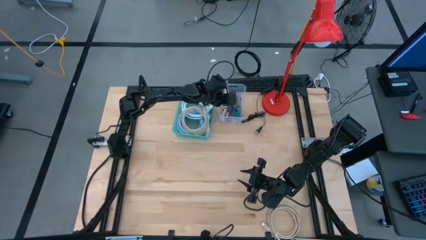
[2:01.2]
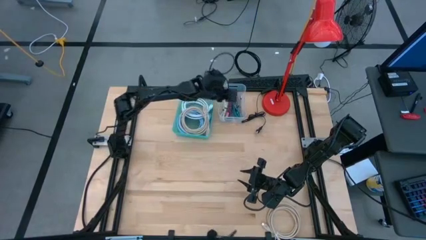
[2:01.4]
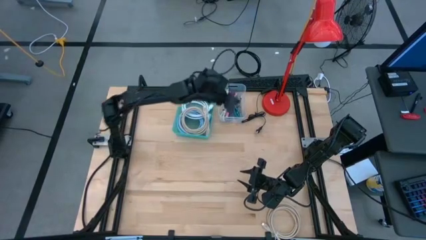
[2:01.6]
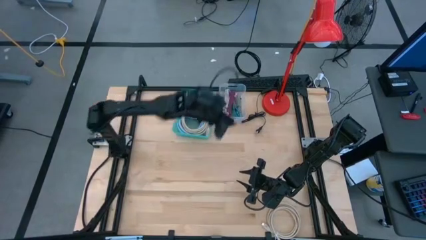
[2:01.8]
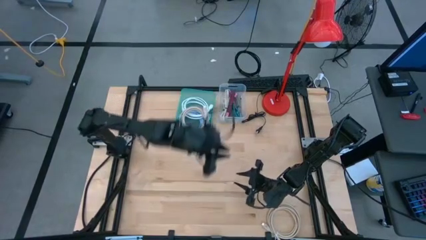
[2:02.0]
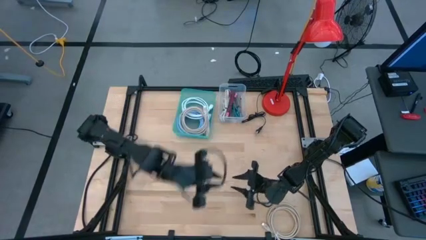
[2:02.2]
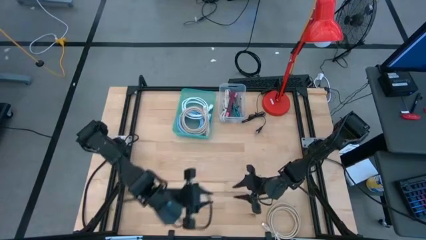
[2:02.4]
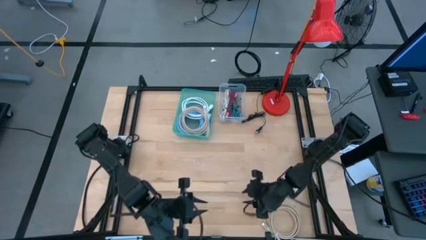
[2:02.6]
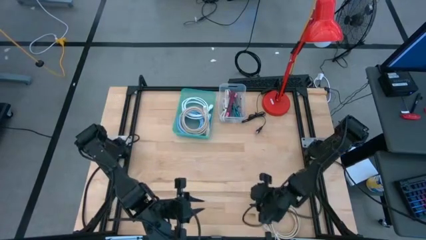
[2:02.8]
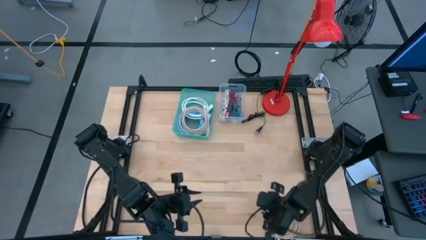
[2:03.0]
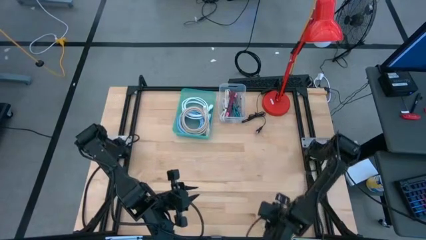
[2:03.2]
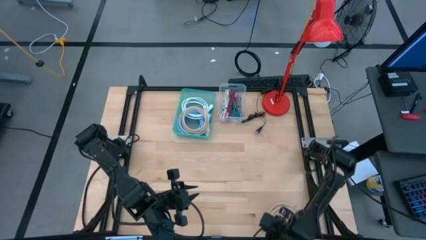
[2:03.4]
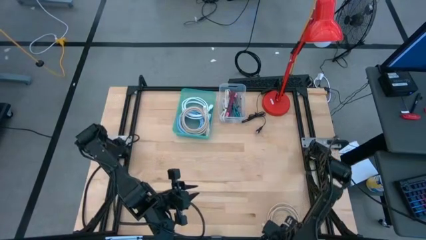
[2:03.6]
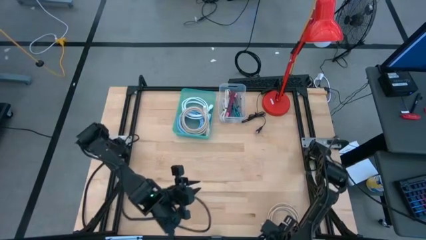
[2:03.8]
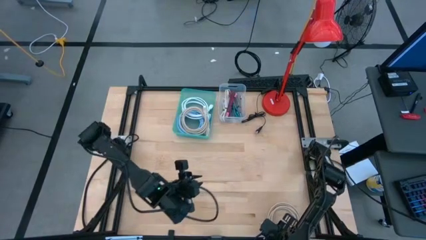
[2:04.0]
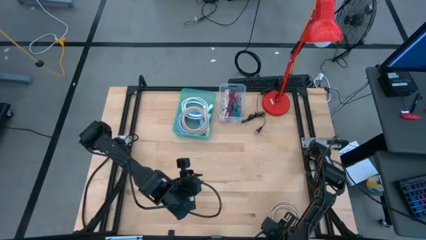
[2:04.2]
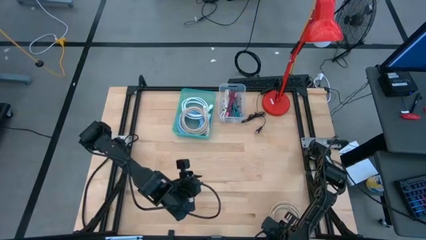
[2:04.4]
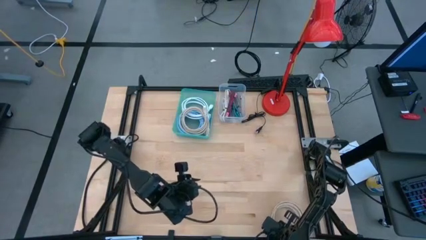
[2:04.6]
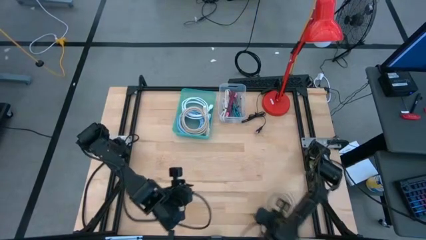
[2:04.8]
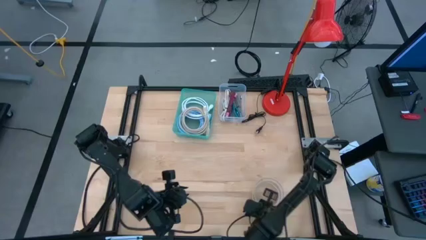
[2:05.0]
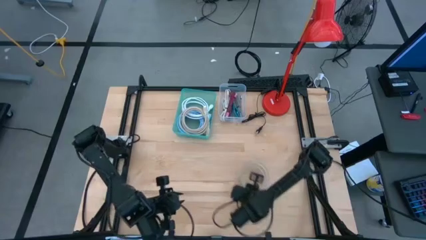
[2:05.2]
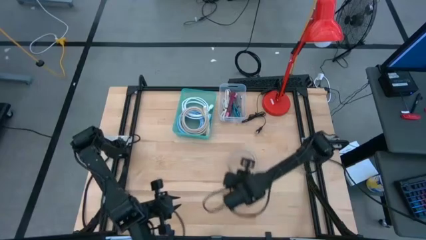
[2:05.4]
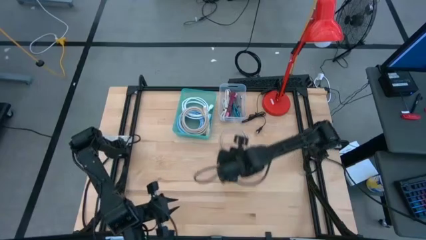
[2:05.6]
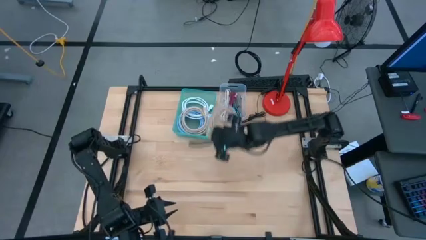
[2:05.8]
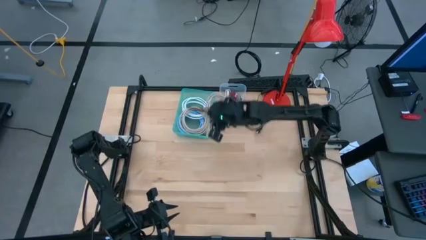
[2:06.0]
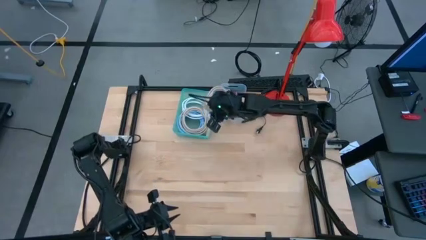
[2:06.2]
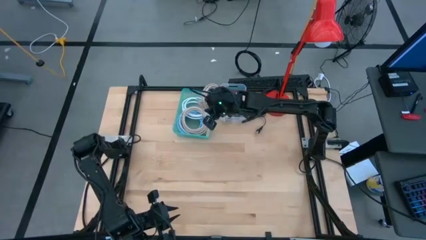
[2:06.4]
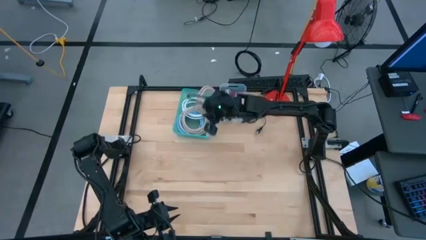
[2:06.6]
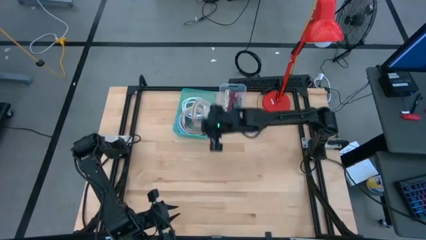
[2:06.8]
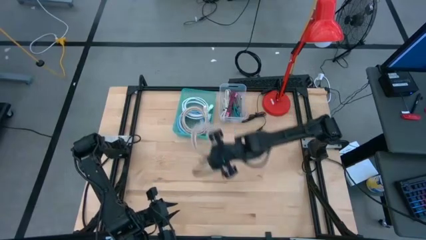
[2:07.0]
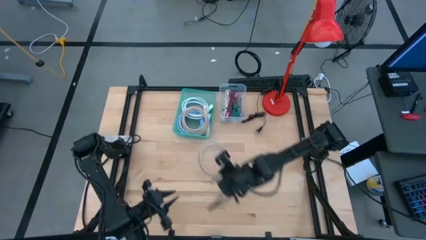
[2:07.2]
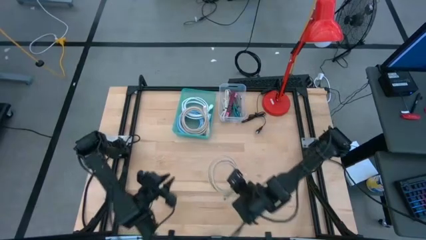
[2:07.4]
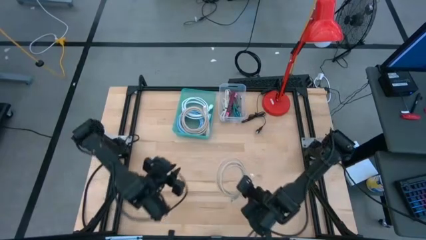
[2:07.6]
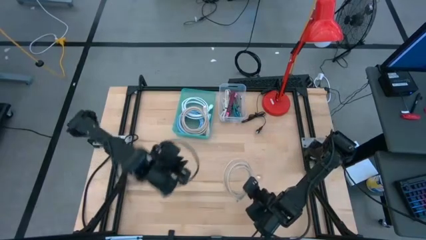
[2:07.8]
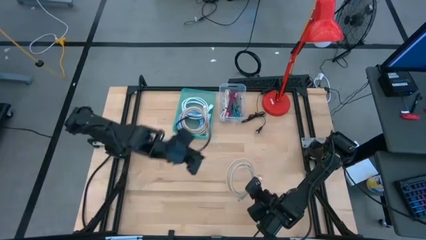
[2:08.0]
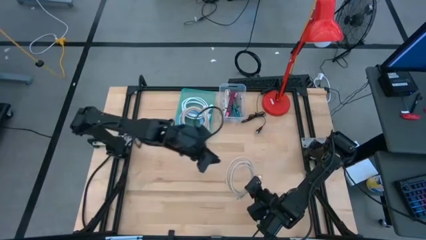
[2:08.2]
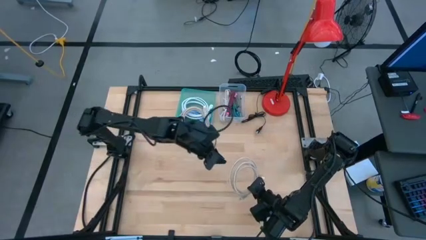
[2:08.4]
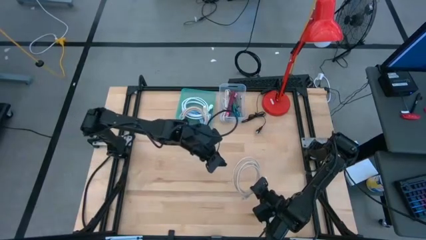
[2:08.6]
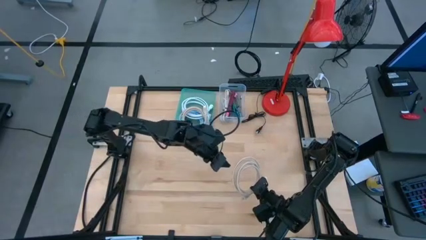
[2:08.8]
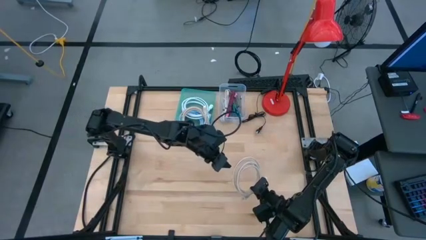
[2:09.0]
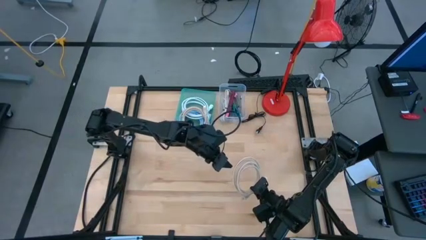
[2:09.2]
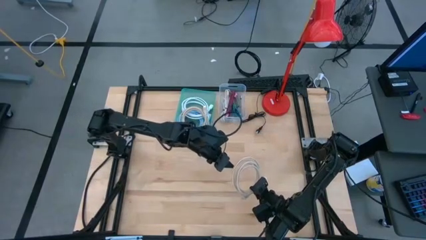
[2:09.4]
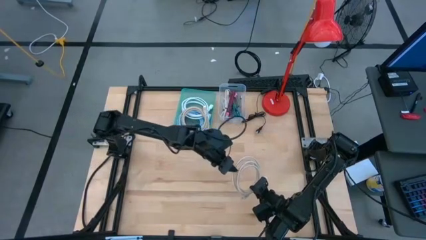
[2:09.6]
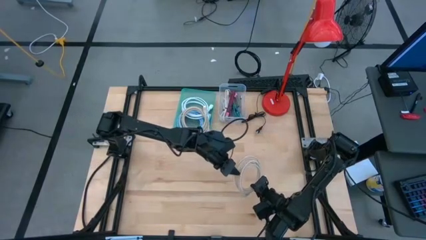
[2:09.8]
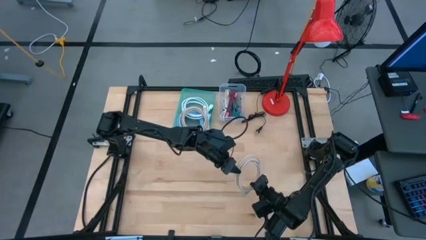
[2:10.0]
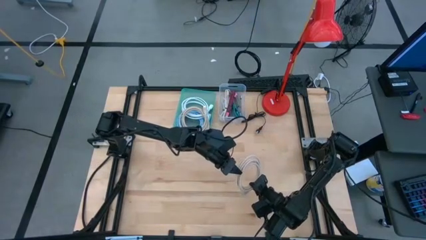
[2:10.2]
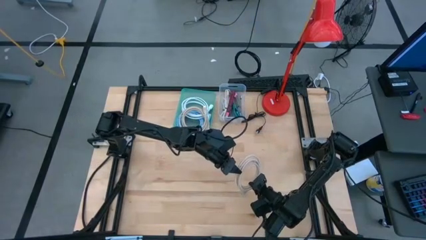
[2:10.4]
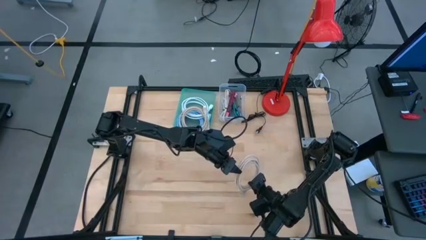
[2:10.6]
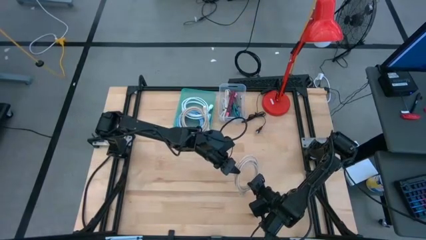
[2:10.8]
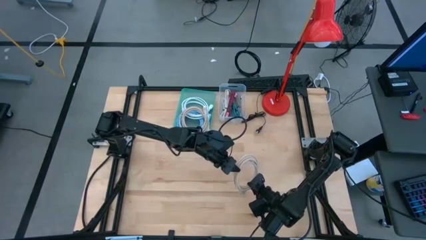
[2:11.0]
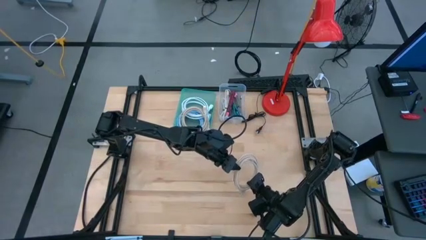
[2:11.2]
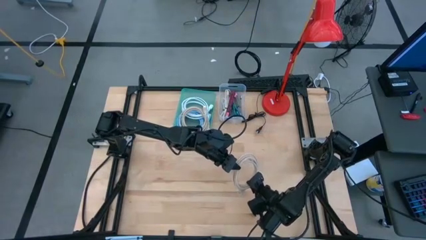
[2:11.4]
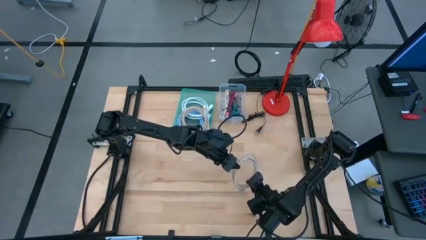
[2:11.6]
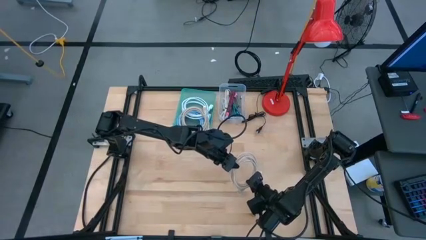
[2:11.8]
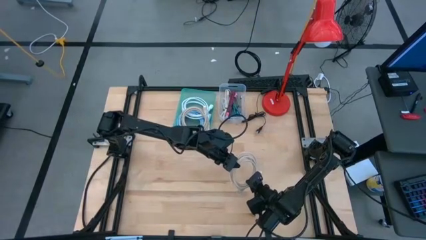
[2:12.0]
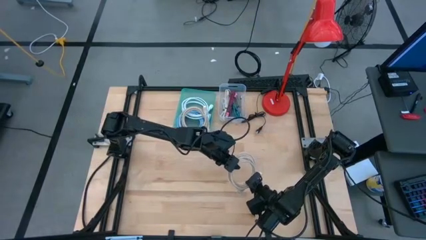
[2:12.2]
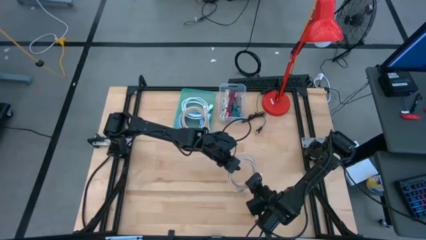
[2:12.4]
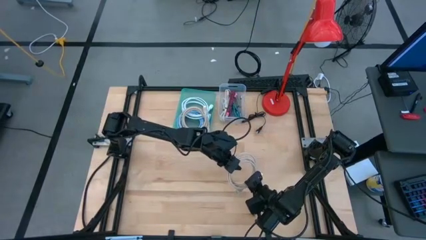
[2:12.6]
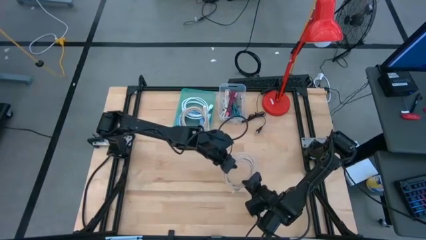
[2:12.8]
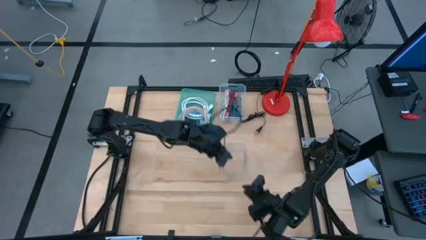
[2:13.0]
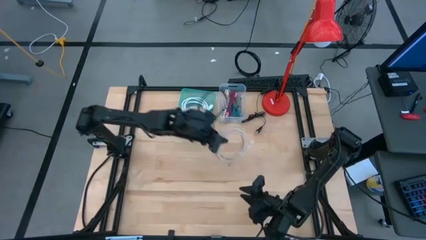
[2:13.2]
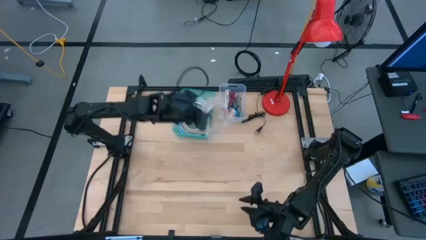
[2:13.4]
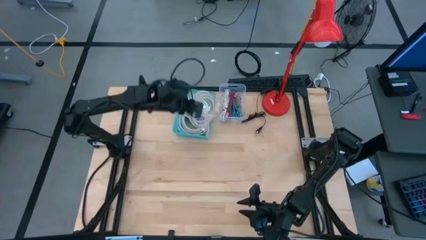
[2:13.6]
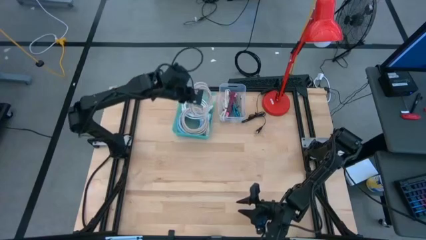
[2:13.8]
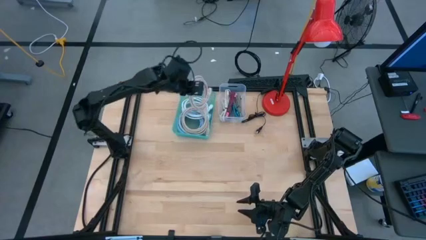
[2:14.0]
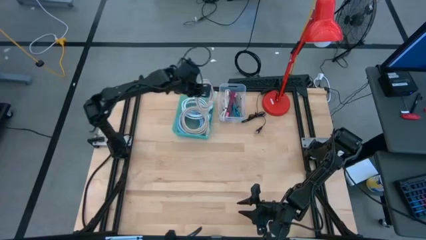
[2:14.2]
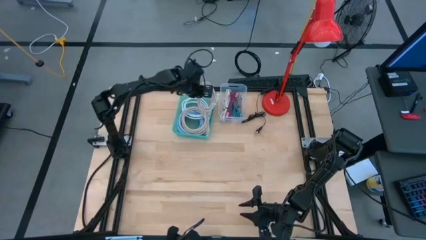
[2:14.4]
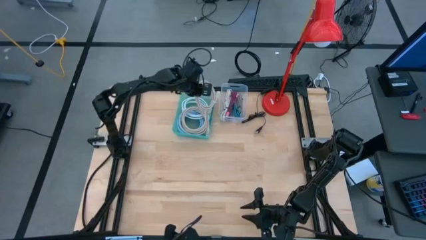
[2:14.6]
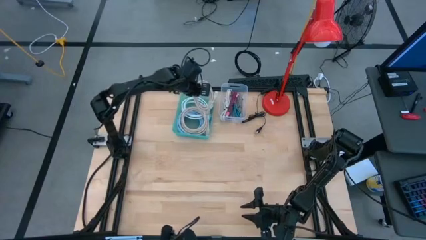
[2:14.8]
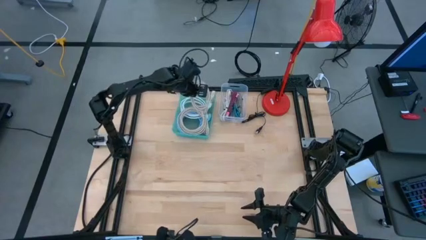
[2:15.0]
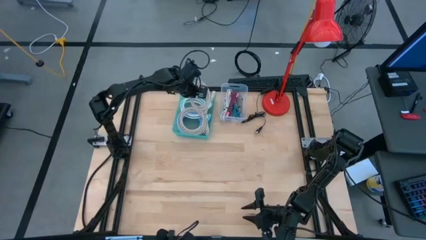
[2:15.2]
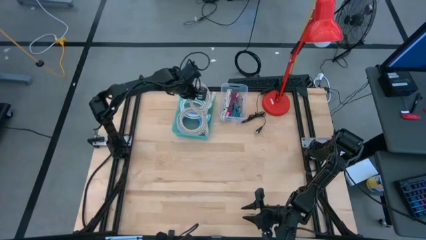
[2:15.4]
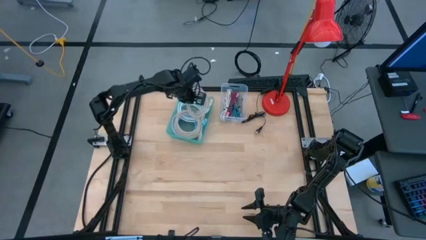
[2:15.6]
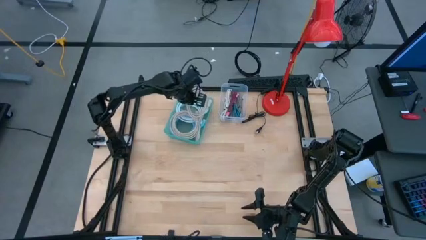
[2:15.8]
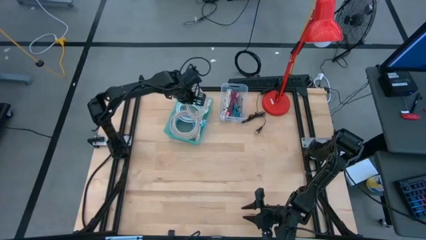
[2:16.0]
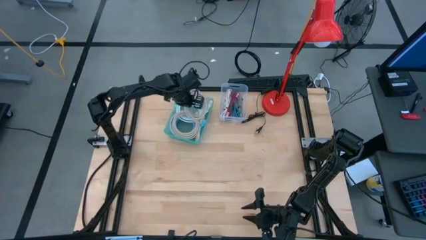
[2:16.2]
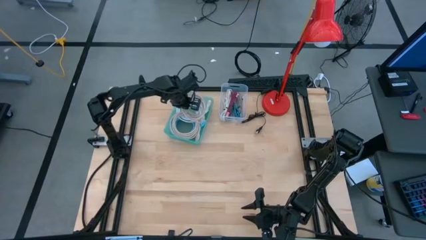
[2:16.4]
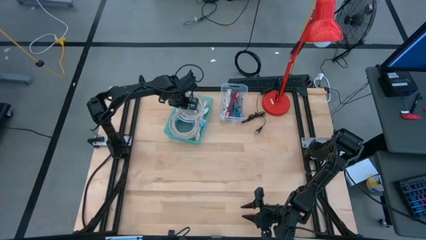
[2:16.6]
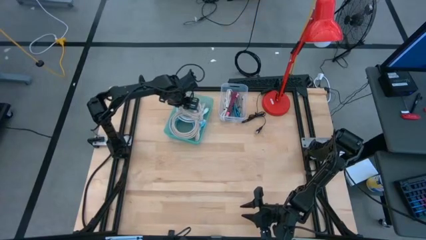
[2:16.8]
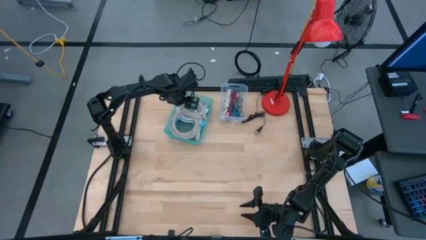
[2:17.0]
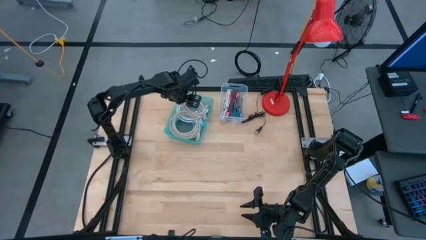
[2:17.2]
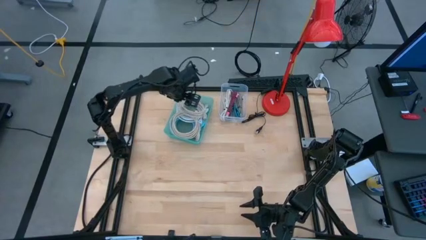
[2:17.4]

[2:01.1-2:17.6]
Task: Pick and place items into bin
Put the light brown HDMI cable into the green bin

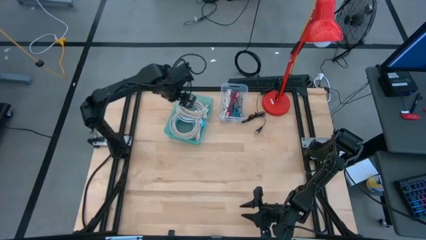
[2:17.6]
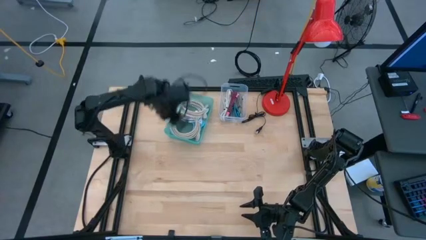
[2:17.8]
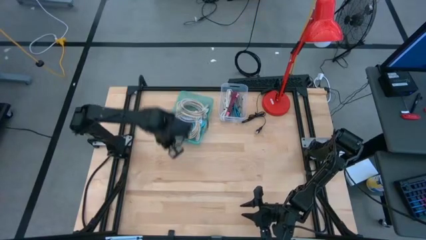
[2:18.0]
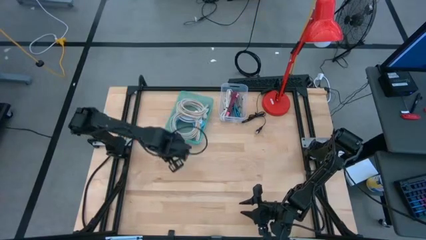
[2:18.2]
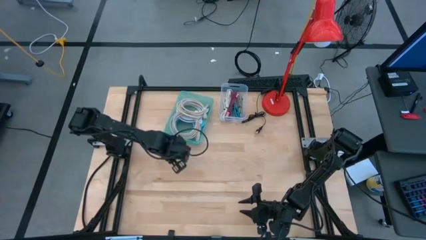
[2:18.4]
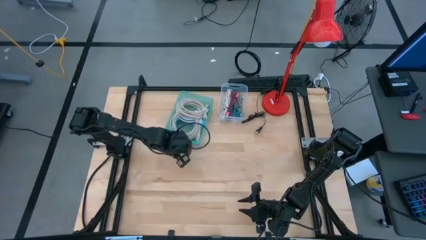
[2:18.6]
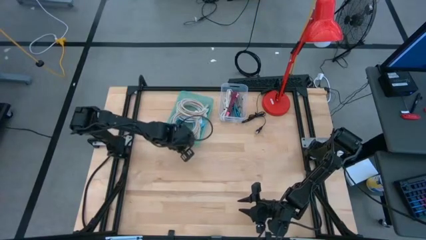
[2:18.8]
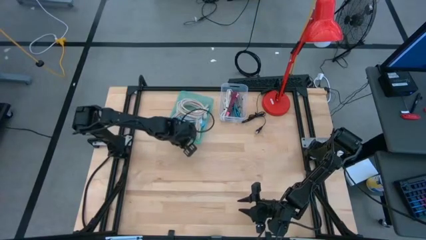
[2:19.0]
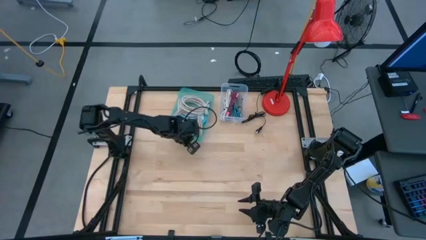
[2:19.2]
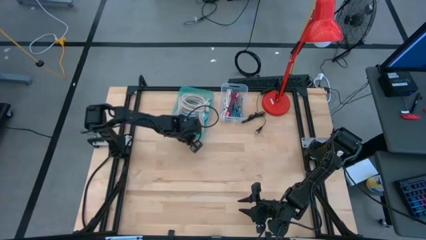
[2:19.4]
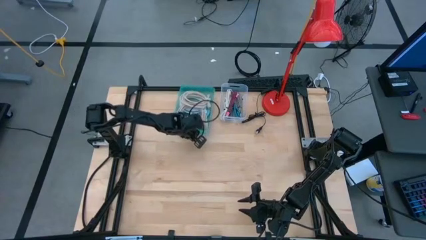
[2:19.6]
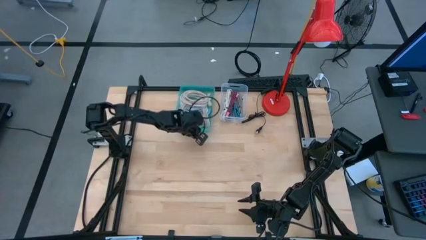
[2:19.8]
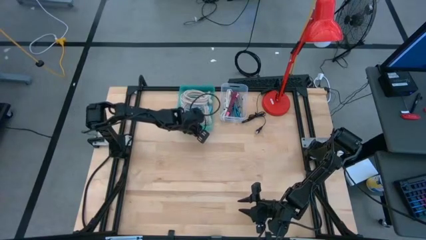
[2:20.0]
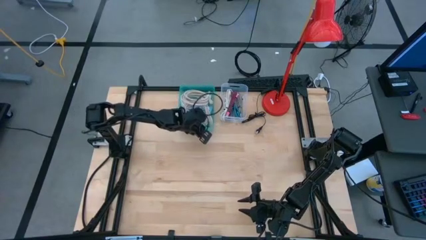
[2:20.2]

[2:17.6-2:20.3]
Adjust the green bin
